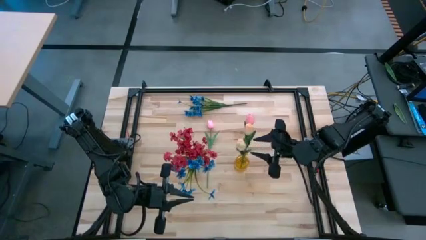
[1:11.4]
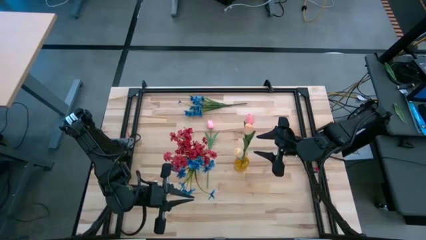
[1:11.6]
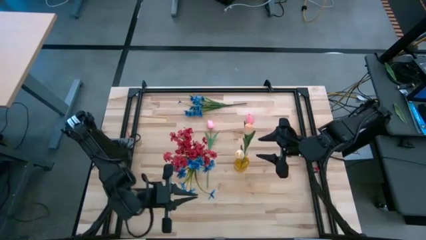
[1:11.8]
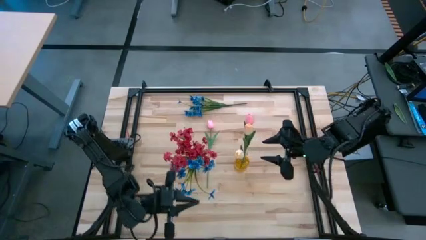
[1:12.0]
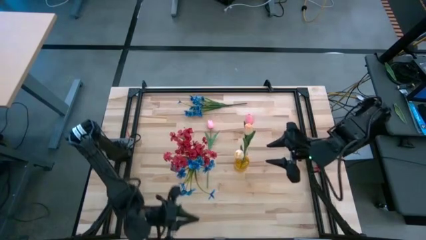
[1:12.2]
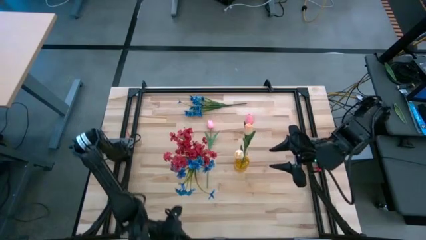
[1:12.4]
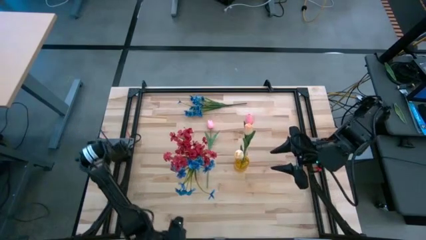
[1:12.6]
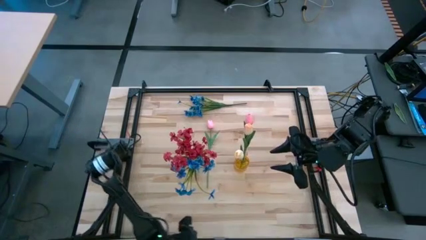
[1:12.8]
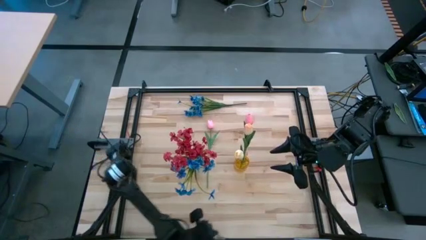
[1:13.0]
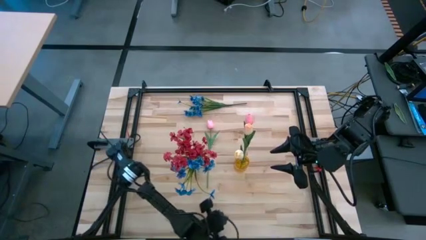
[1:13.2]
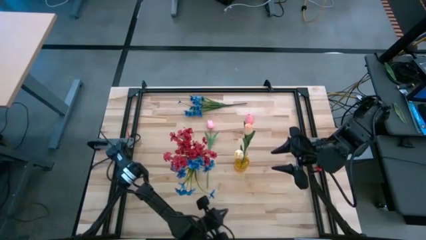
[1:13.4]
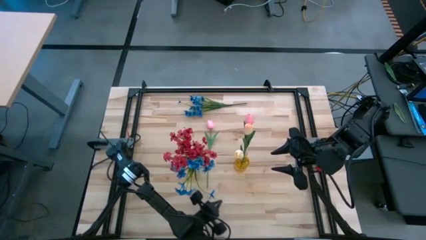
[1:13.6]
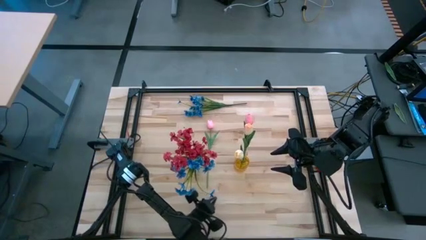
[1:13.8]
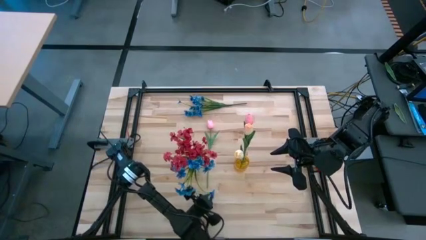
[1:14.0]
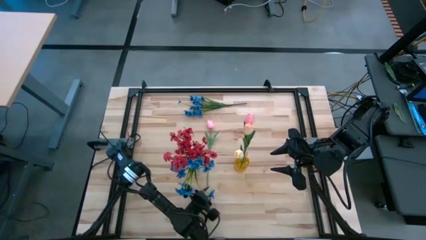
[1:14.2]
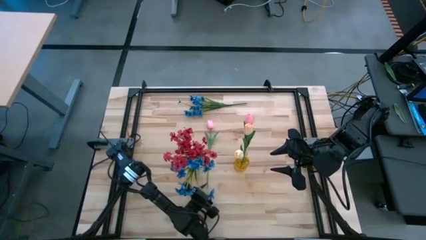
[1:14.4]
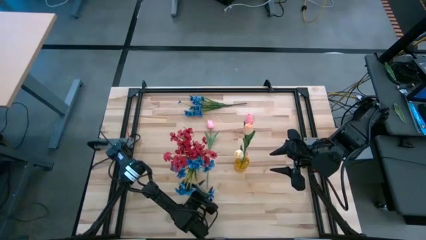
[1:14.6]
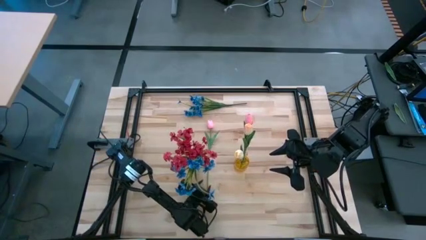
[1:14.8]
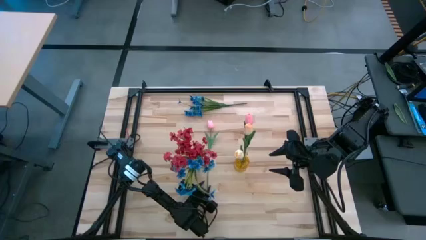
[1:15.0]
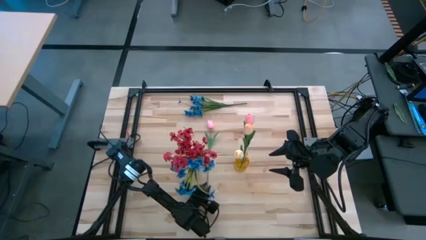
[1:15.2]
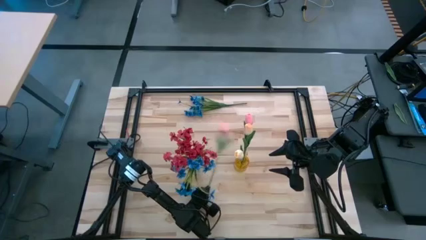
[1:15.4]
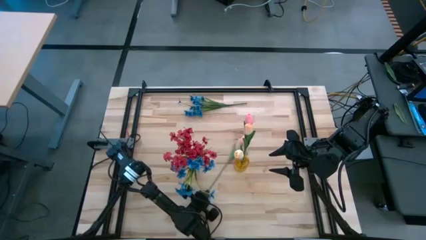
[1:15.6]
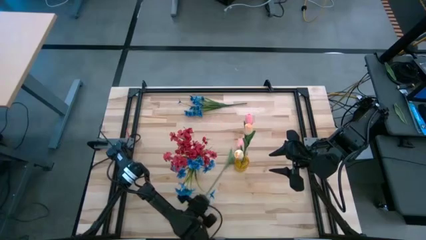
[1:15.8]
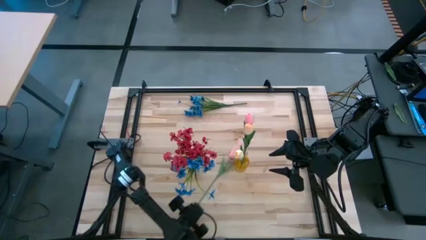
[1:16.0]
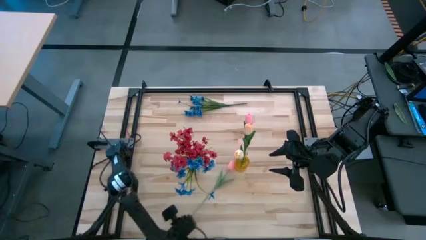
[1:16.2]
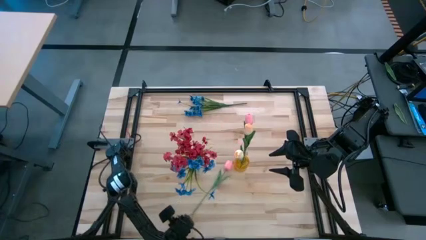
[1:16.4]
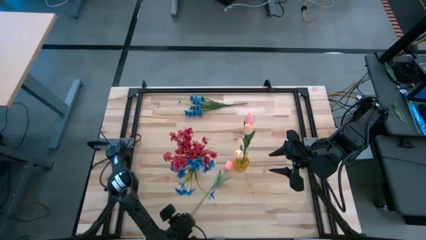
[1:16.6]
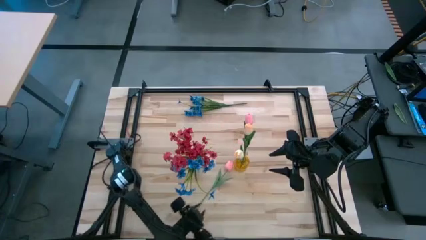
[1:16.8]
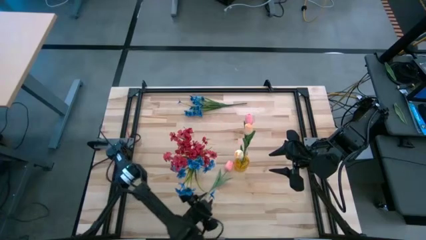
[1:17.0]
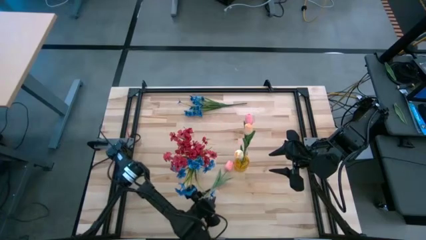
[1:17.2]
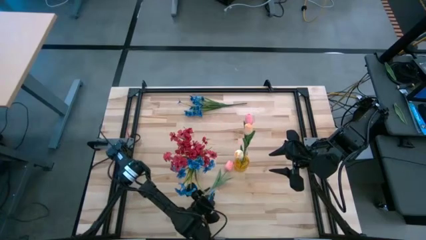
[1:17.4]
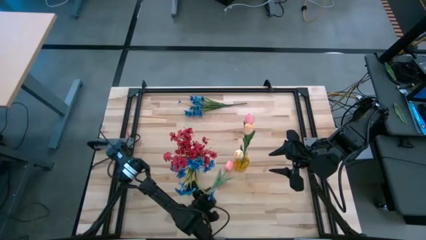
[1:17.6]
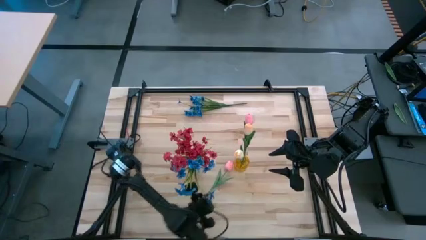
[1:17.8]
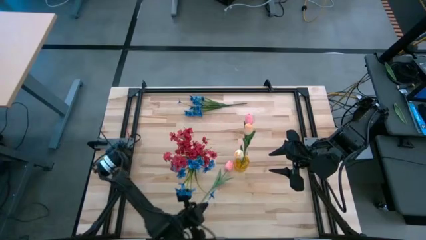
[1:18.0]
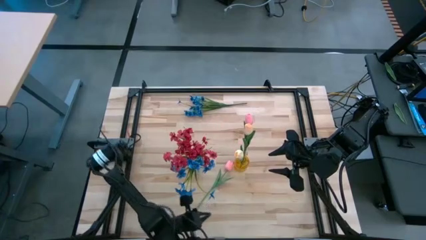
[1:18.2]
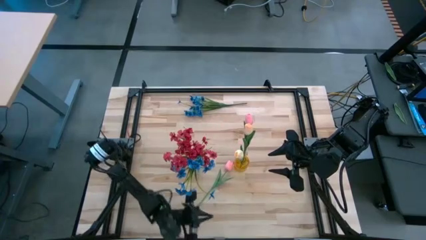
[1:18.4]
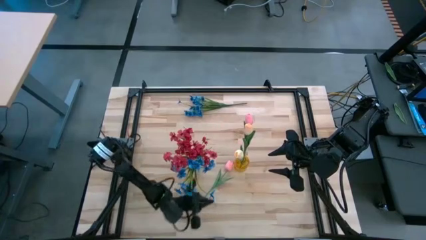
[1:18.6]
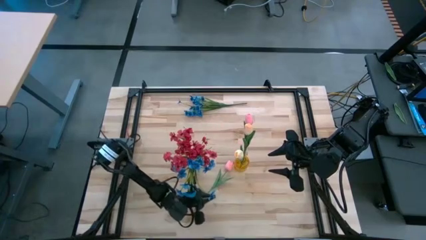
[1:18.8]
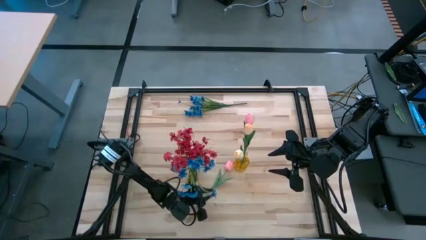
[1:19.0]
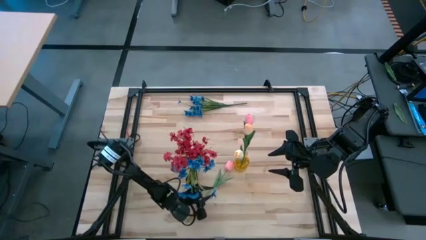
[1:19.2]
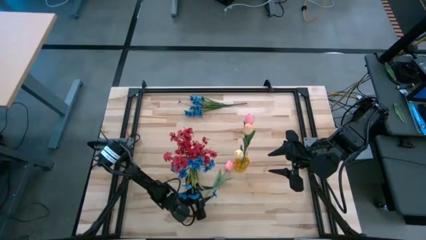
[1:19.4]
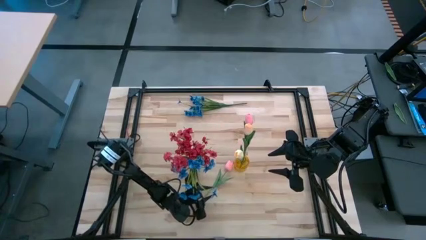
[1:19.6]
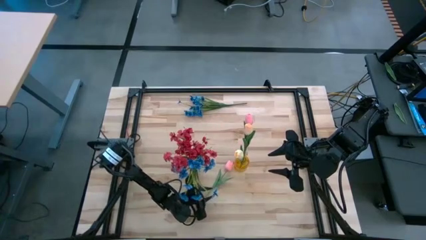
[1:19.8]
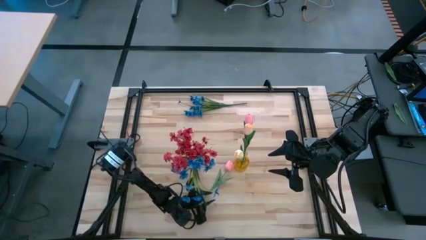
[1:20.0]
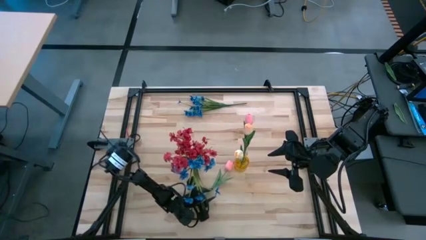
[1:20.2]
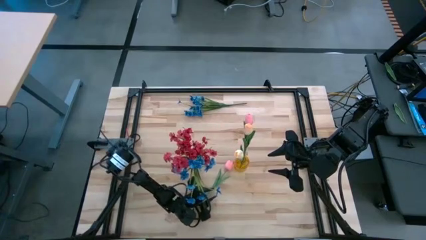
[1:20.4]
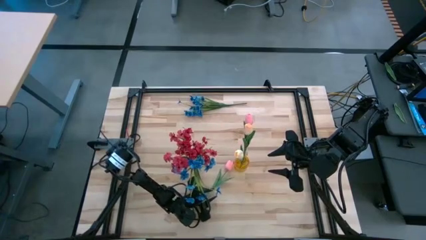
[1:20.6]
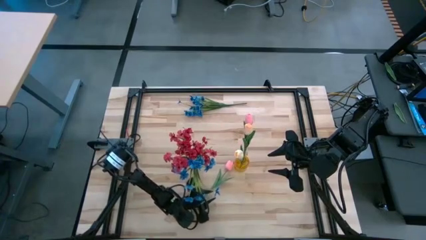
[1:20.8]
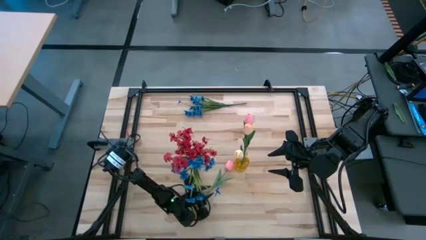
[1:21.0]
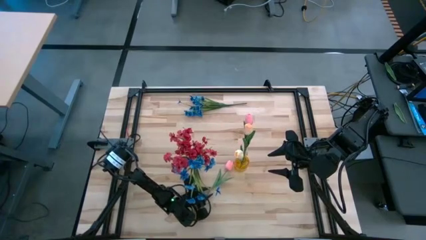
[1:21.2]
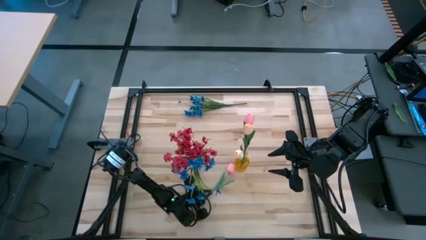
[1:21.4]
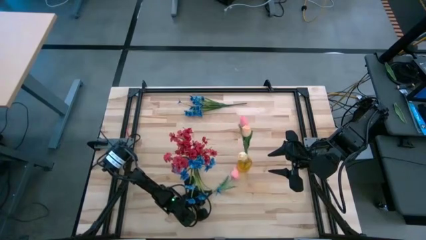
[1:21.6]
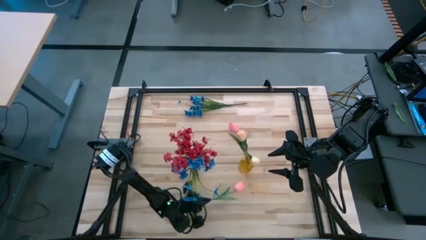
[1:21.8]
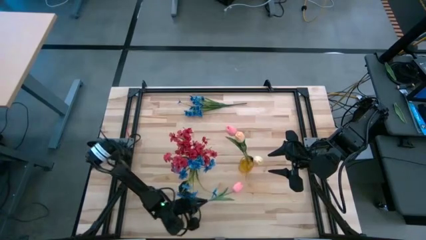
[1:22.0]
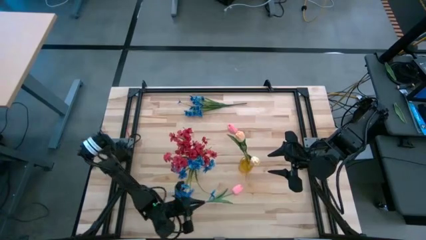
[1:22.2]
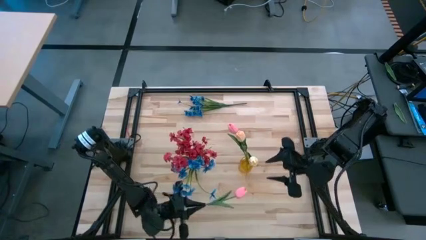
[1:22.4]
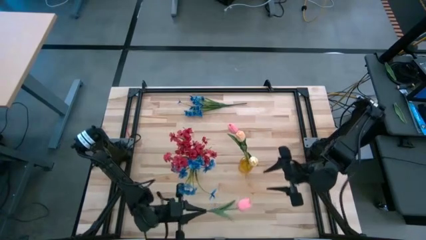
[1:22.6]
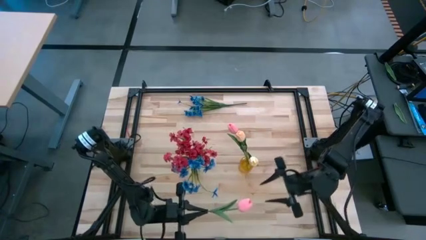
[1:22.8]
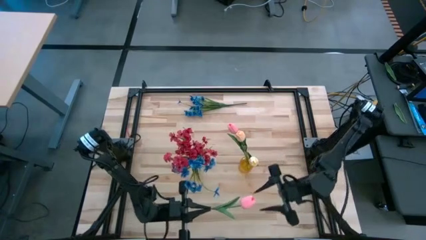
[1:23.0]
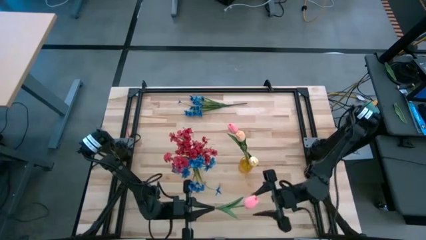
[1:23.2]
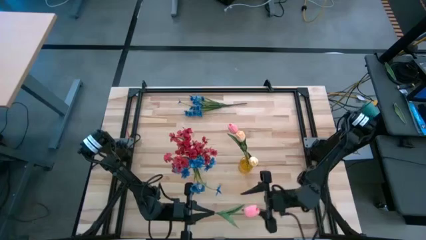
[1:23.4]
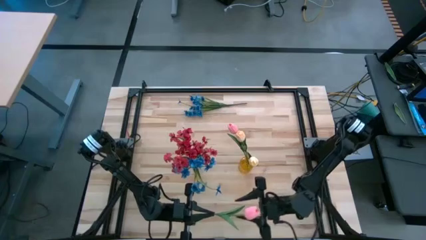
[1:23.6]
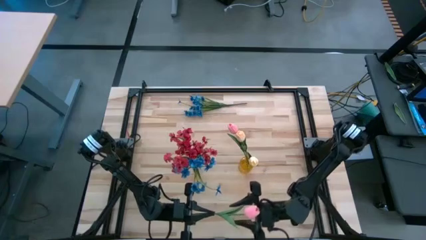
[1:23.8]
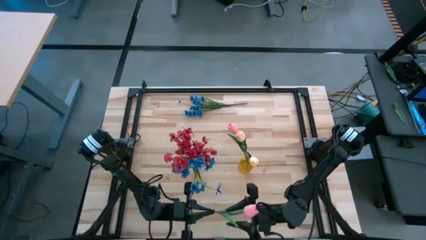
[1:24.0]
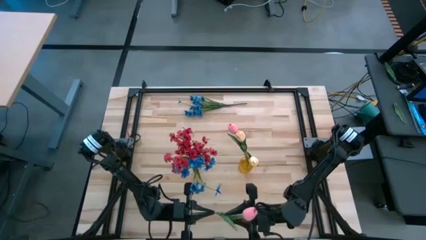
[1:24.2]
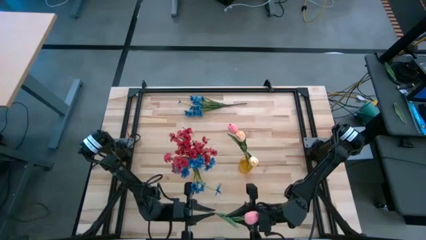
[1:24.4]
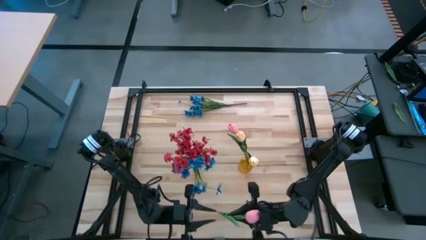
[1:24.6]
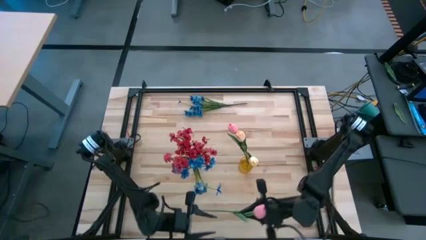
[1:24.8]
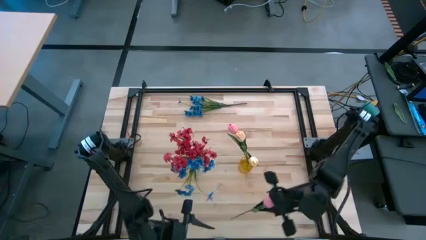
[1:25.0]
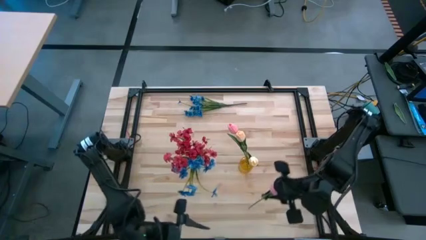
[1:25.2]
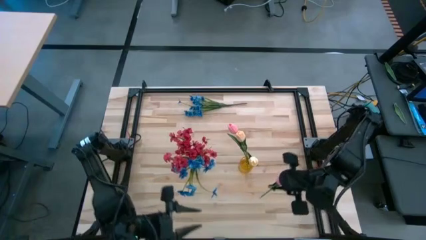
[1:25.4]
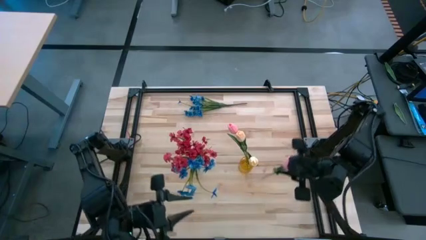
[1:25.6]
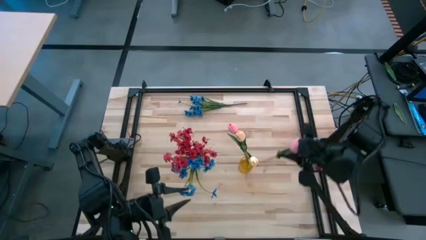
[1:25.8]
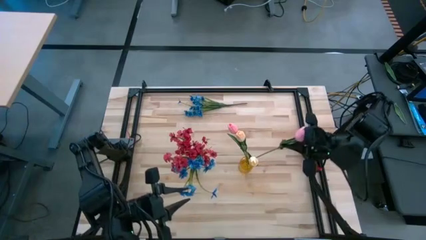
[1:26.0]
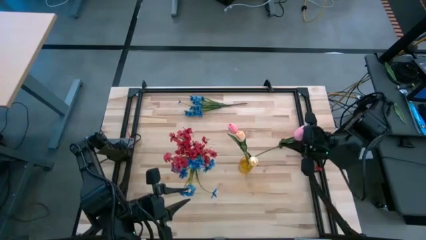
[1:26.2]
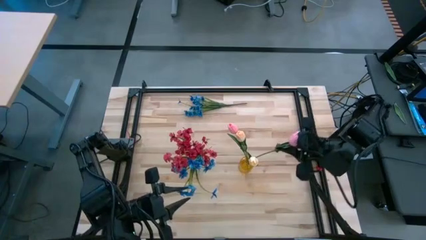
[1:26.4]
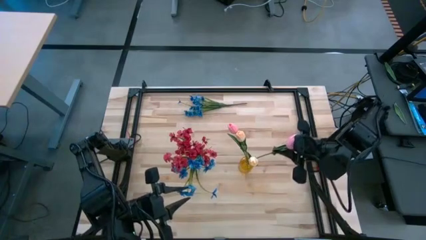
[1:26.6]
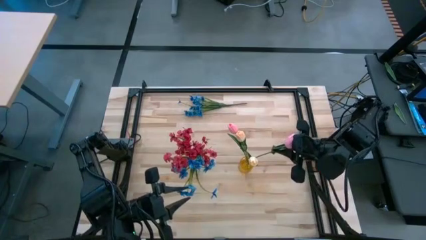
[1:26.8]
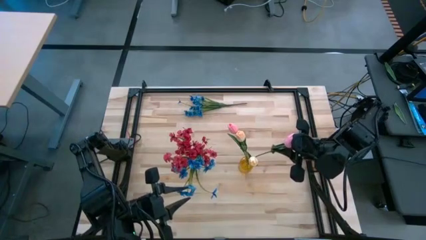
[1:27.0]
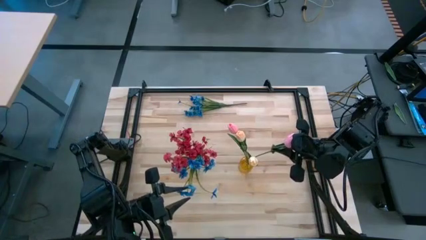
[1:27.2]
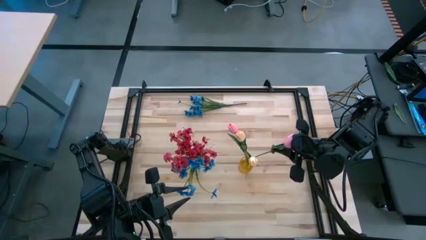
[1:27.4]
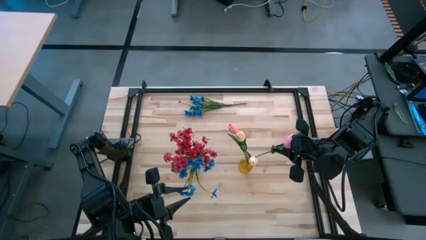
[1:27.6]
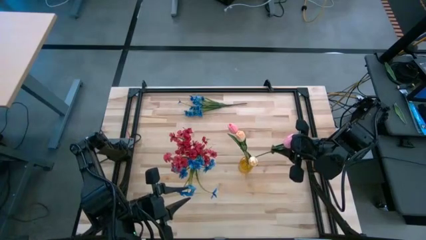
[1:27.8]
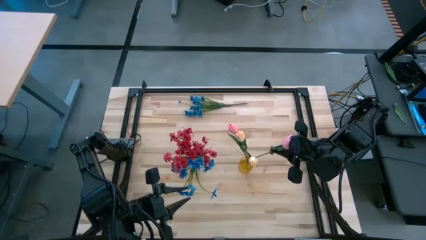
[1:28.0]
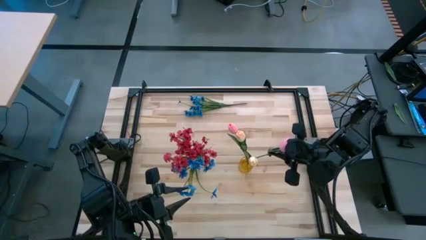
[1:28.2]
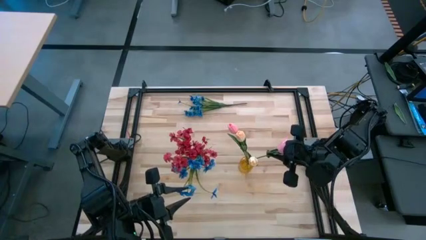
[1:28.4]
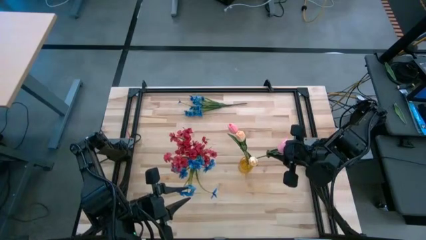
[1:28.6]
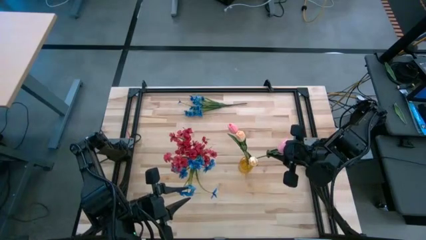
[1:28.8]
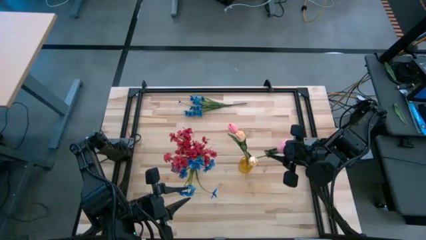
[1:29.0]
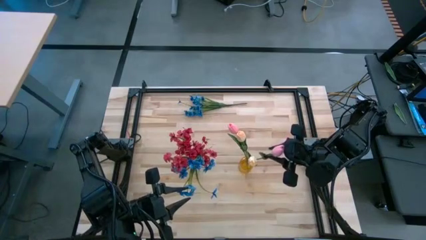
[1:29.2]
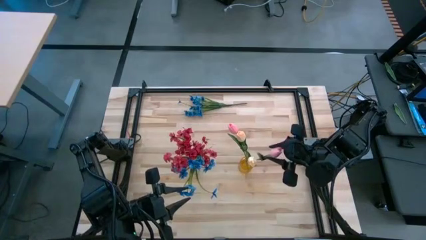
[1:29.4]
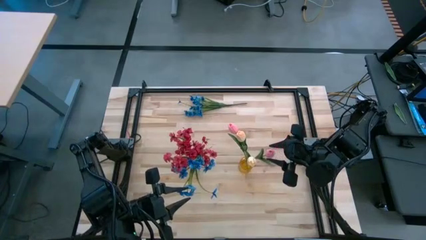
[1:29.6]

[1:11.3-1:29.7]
Task: Sort flowers into vase by color
Put the pink flower into the yellow vase
